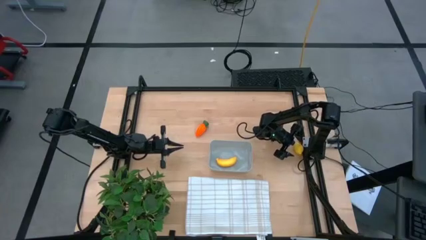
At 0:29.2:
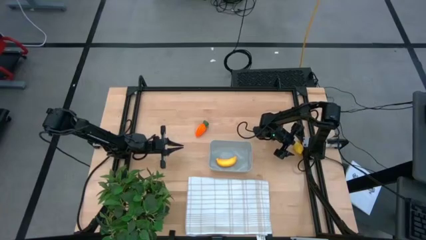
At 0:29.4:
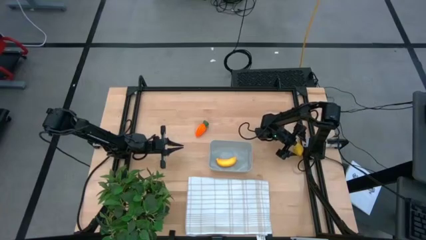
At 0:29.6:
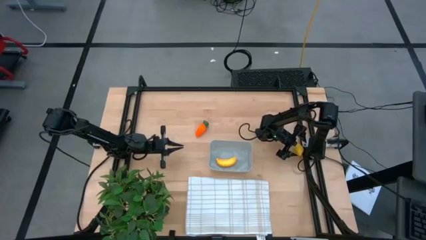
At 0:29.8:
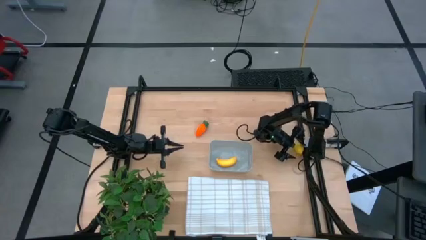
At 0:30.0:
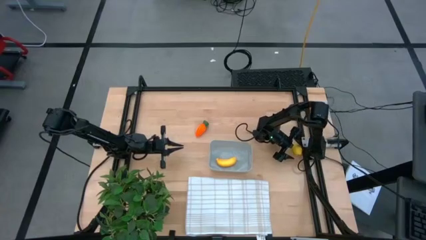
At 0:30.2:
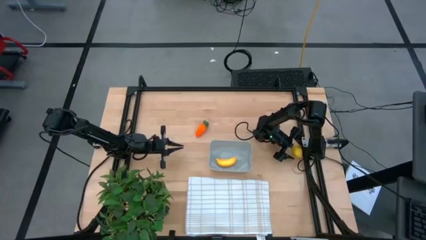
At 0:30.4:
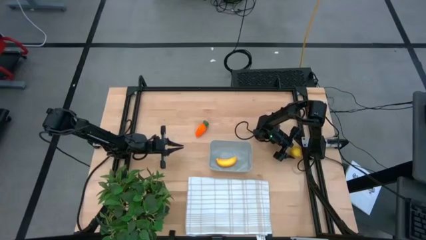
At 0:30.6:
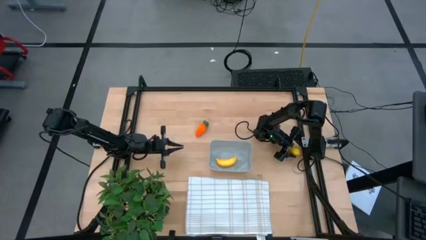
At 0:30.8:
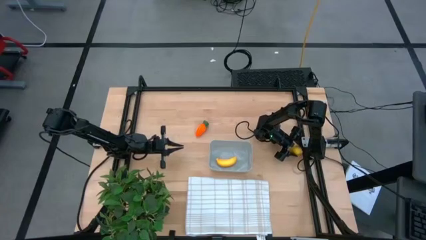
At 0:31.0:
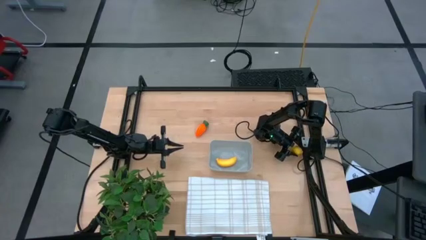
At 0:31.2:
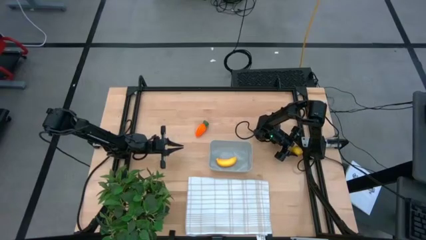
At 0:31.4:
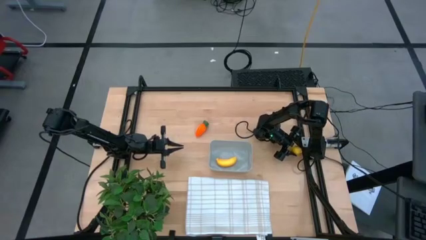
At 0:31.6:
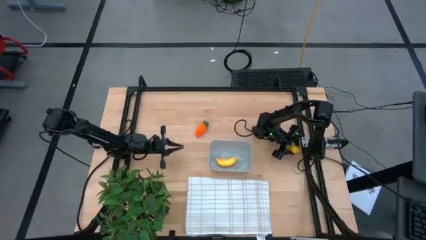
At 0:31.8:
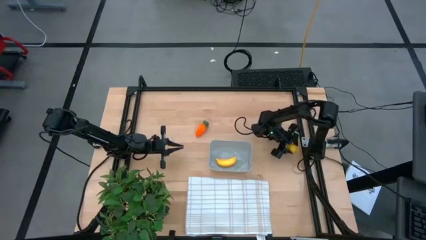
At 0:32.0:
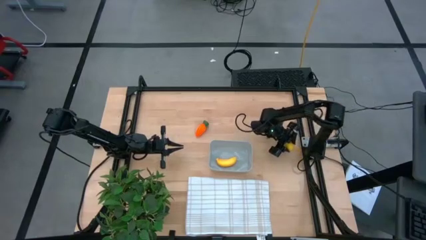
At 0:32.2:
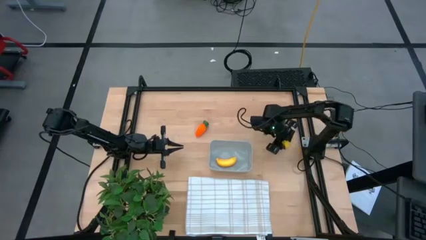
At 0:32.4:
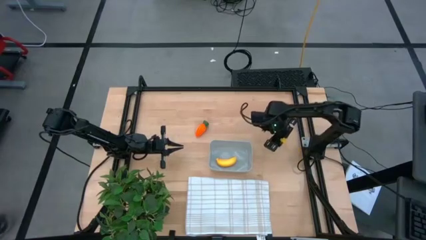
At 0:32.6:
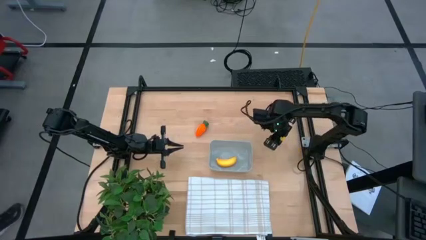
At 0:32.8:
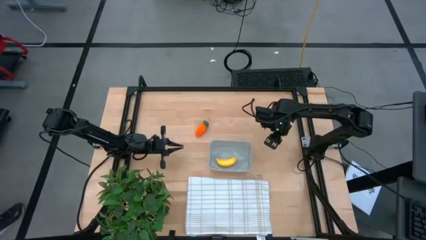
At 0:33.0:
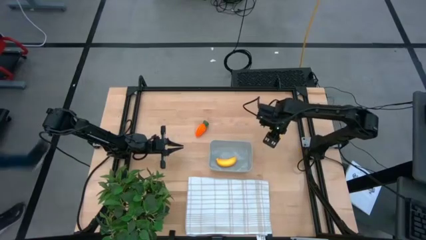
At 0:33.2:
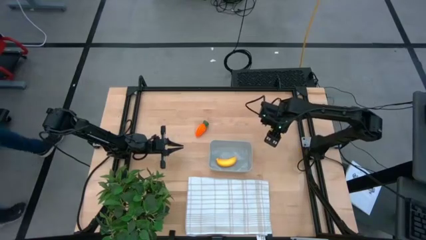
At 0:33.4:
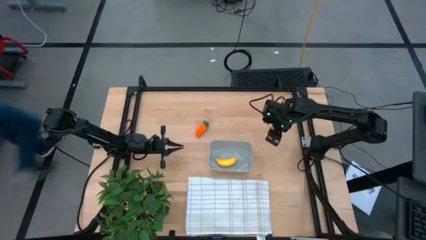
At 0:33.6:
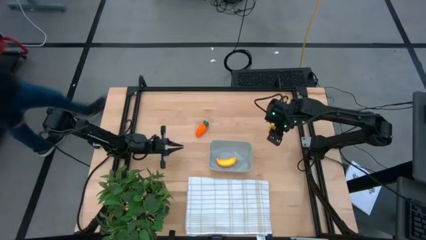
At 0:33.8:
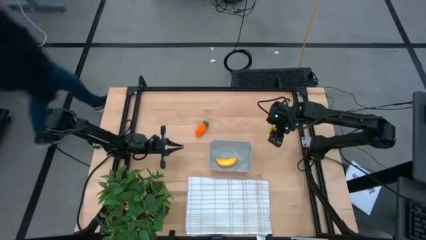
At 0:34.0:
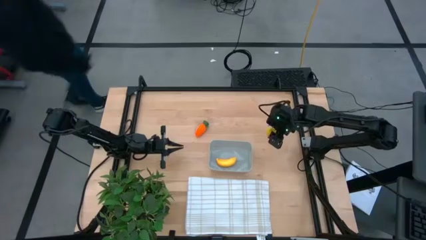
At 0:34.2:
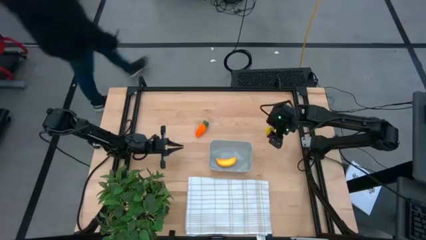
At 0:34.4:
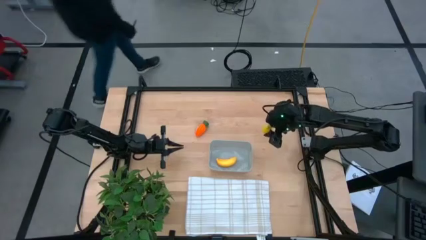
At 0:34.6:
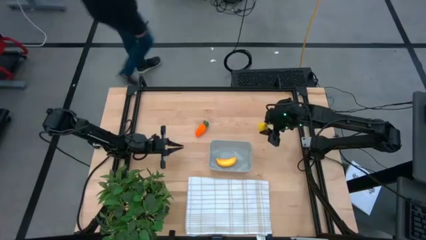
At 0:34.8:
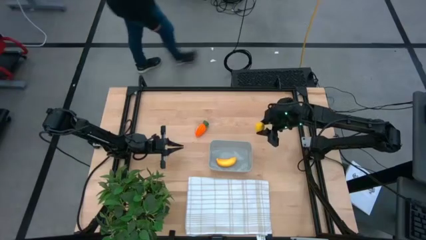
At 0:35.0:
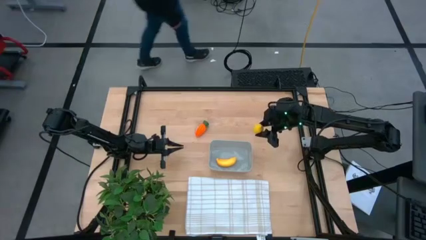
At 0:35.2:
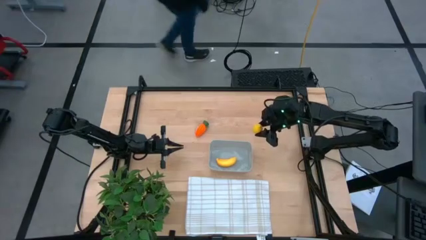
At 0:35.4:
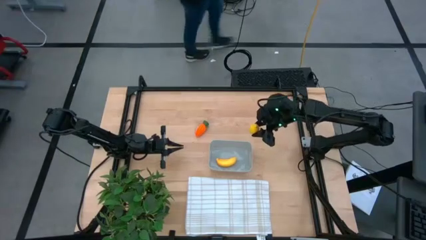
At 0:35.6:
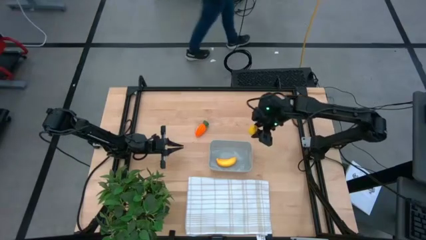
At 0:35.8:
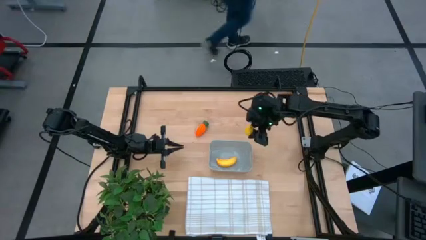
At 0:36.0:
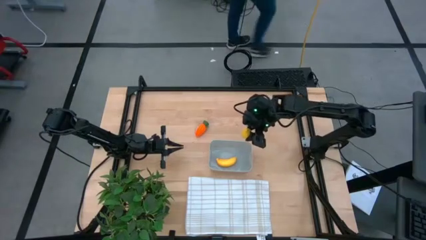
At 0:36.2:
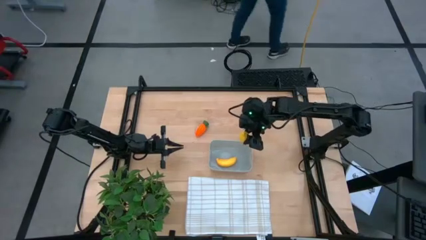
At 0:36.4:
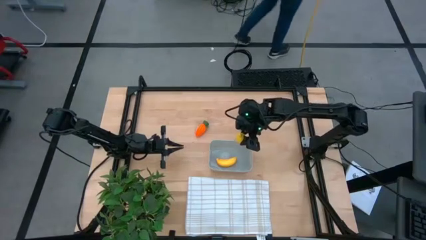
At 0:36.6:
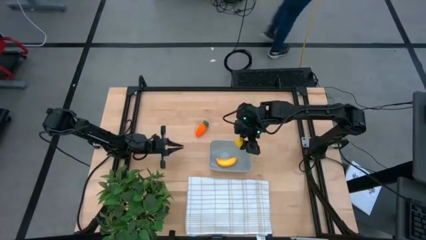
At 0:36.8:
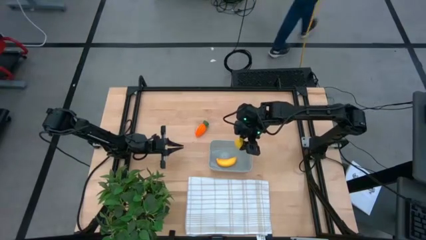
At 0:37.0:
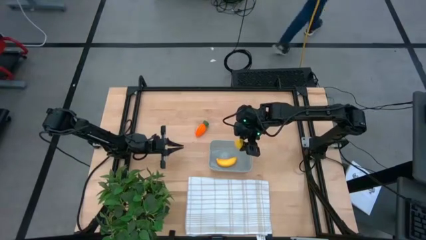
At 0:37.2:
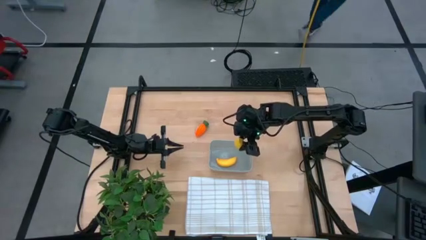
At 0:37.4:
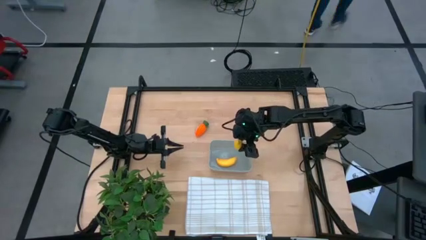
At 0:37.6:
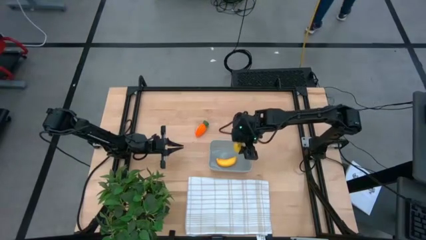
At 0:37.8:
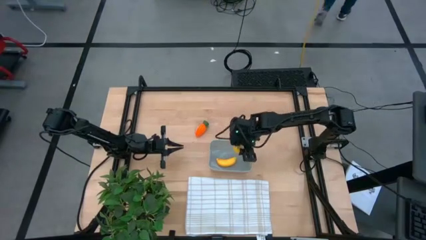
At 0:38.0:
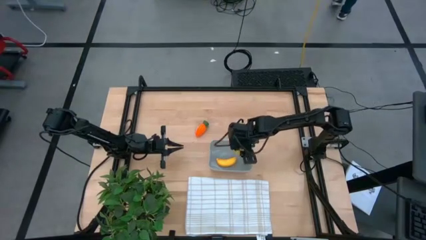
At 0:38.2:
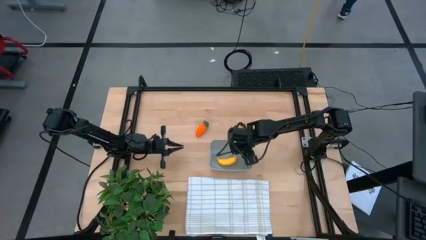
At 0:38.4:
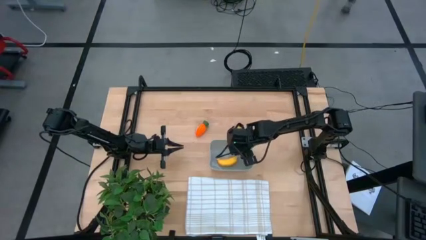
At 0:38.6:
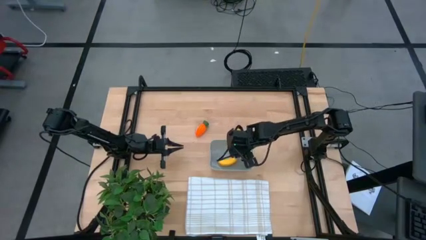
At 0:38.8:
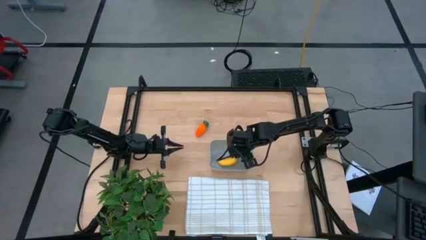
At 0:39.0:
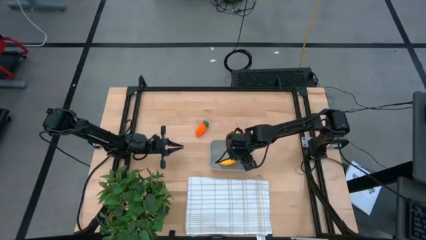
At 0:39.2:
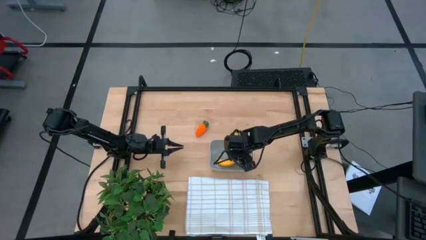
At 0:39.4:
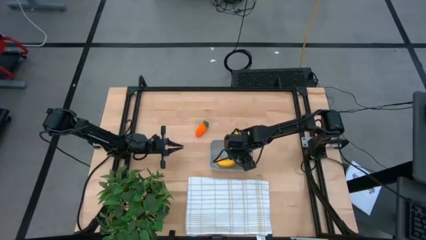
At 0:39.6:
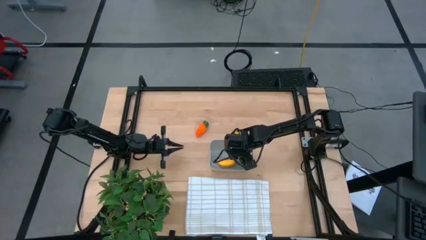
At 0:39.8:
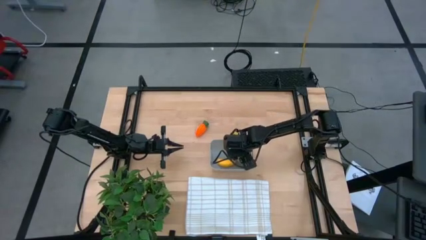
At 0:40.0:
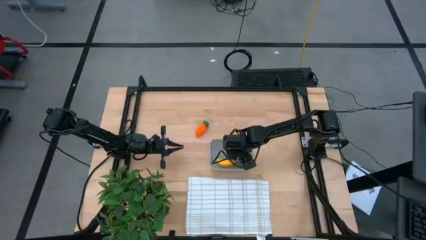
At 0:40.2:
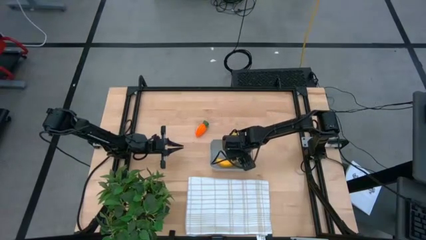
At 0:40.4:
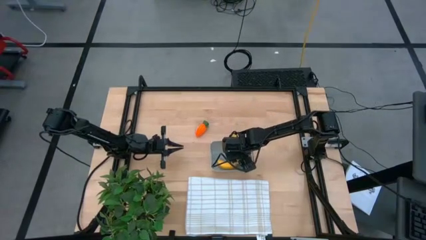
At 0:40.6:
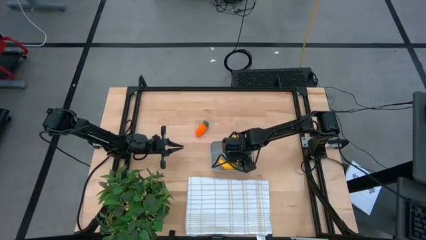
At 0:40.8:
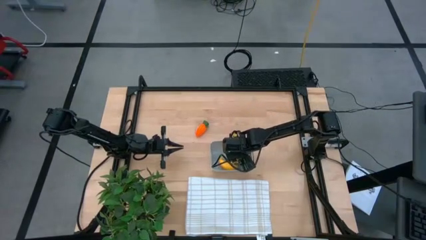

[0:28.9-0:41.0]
Task: Pick and placing Produce into tupperware
Put the lemon into the gray bin

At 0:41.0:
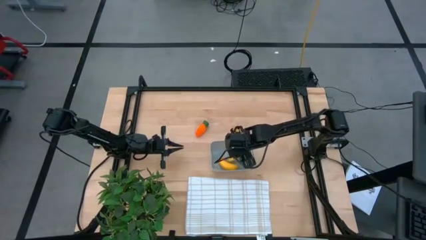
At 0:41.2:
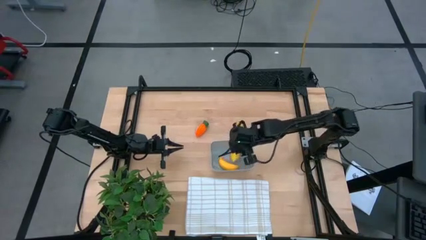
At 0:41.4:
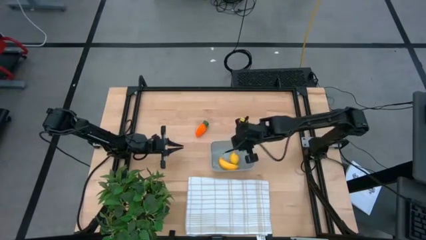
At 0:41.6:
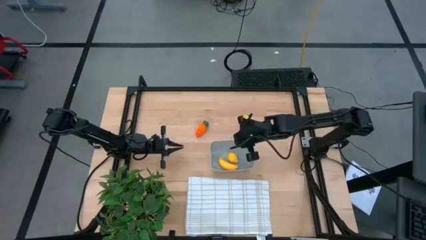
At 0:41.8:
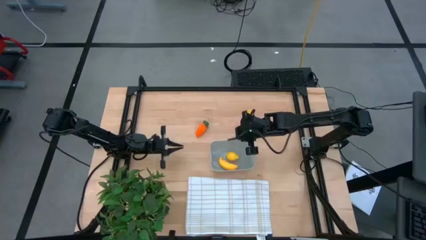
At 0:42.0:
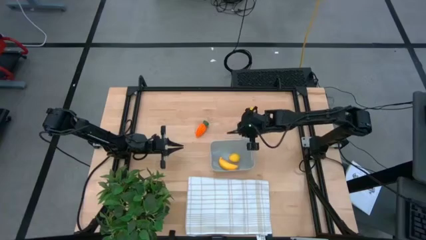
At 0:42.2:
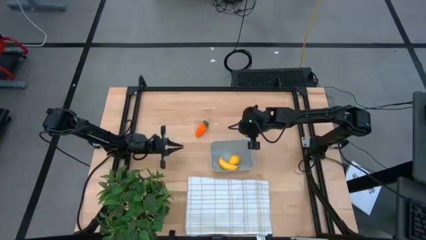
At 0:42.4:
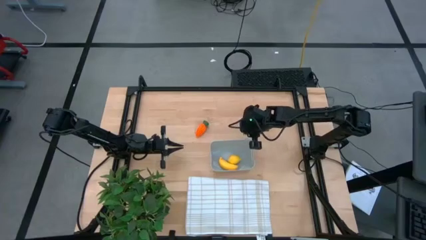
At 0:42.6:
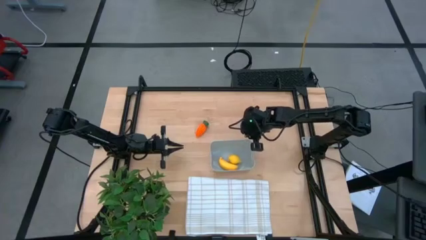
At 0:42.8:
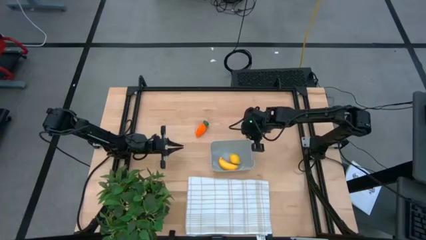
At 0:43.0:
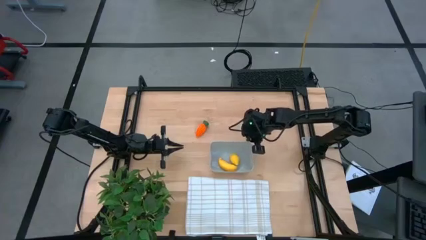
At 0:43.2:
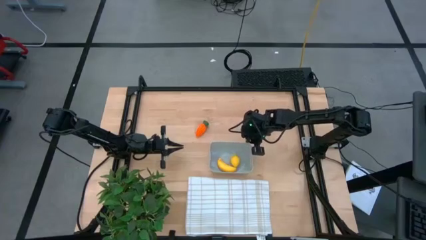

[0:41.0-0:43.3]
Adjust the gray bin

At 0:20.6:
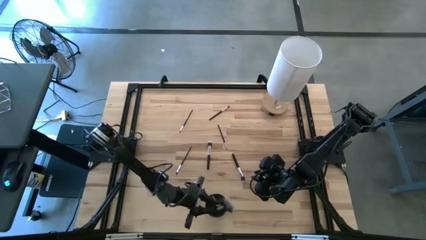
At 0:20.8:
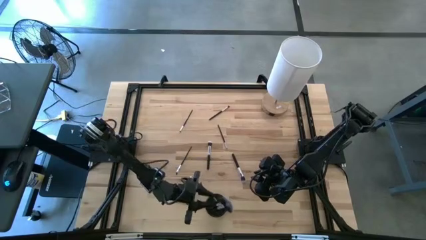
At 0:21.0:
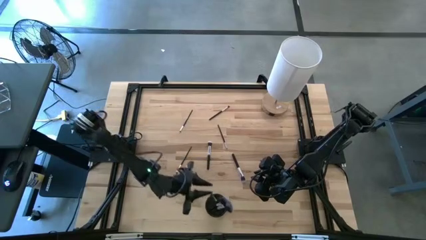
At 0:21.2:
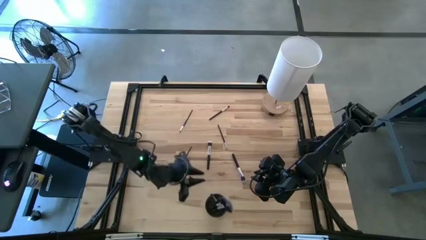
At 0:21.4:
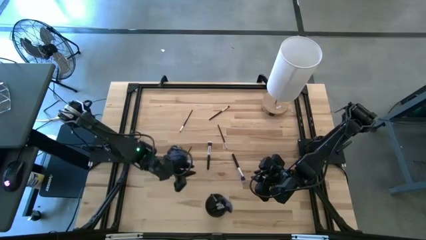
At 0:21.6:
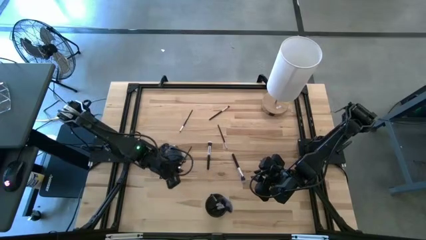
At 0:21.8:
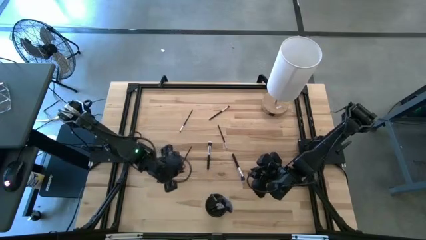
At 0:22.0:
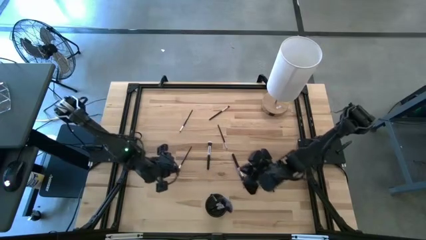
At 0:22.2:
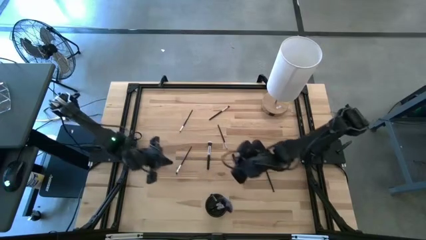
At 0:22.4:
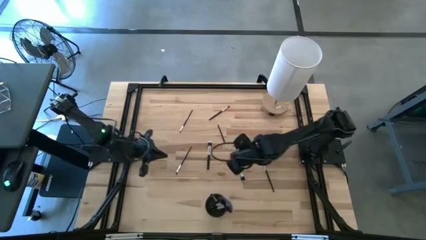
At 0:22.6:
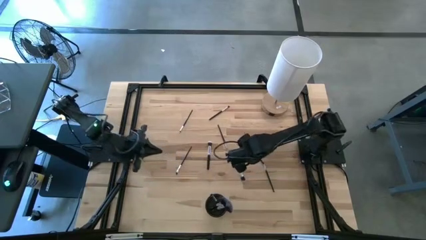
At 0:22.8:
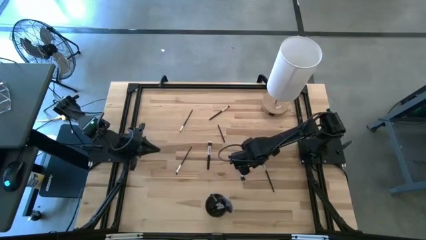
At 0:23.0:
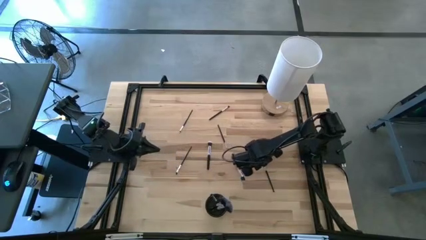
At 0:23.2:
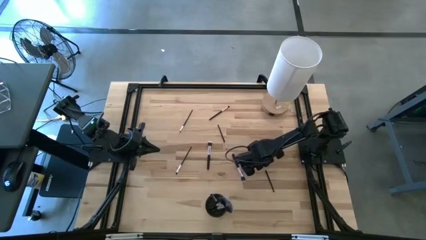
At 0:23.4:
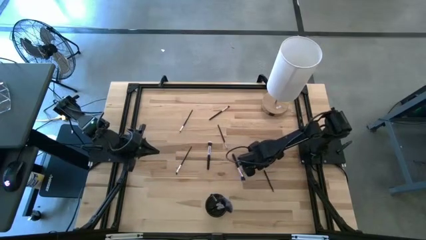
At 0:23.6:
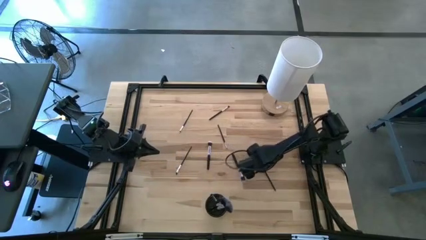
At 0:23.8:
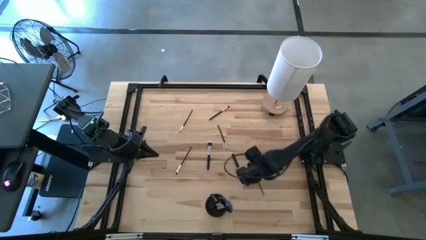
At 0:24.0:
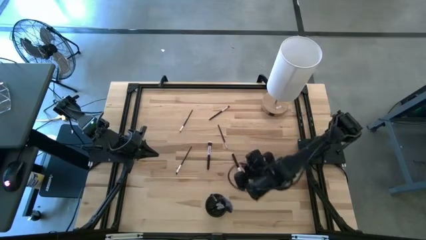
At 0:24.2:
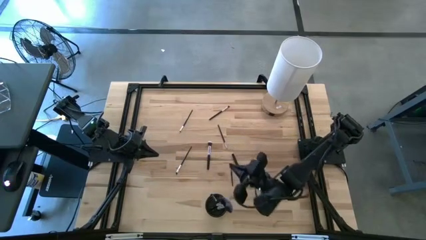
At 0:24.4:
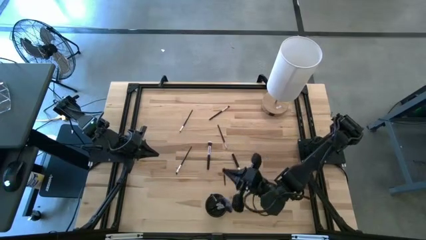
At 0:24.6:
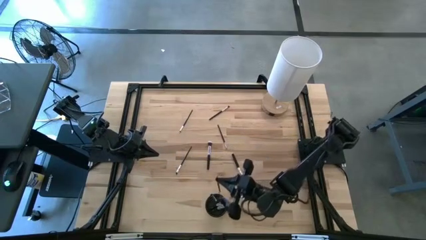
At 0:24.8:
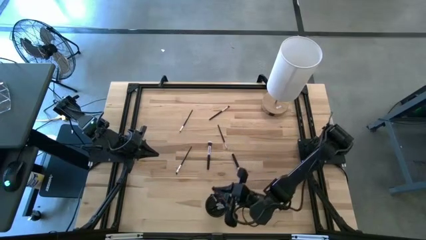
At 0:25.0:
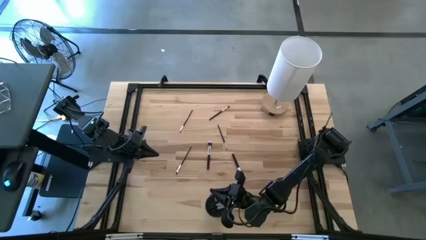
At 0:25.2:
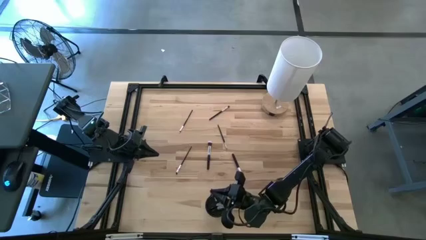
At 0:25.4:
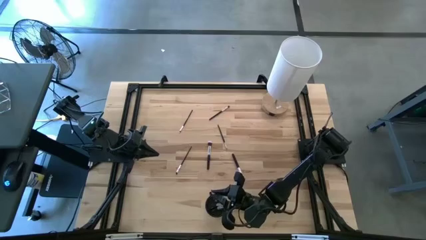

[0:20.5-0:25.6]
Task: Put items in baskets/containers
Put the brow brush into the black pen holder
